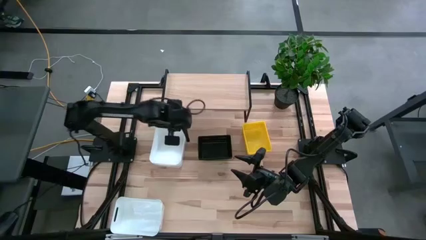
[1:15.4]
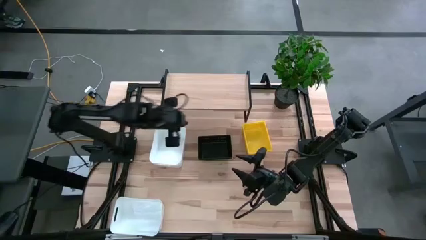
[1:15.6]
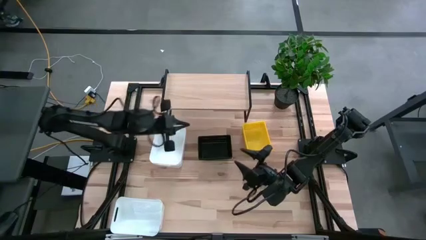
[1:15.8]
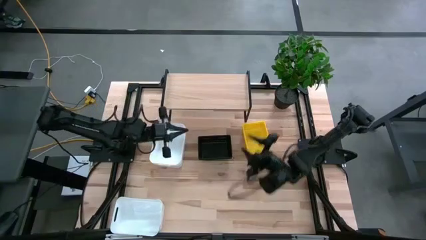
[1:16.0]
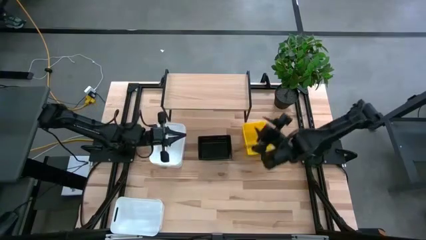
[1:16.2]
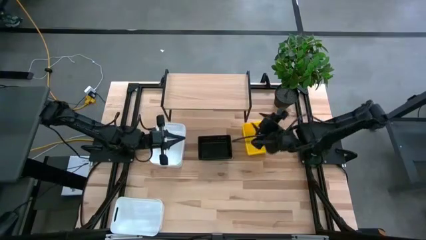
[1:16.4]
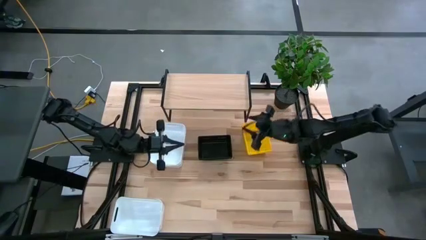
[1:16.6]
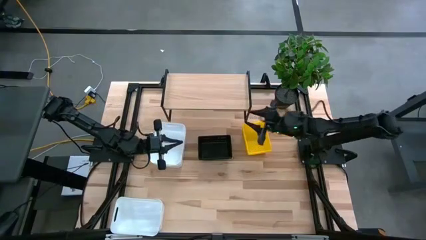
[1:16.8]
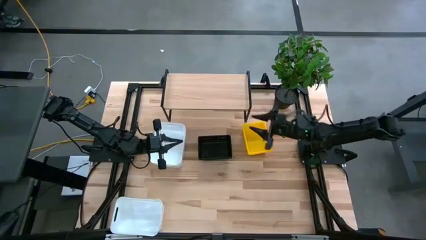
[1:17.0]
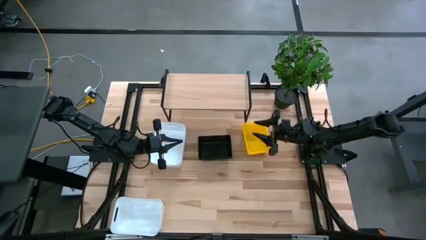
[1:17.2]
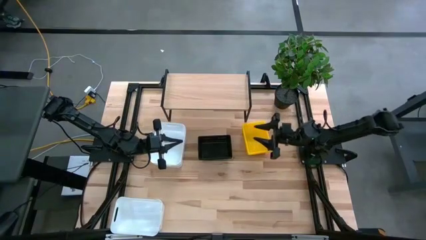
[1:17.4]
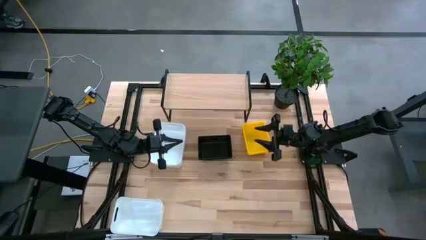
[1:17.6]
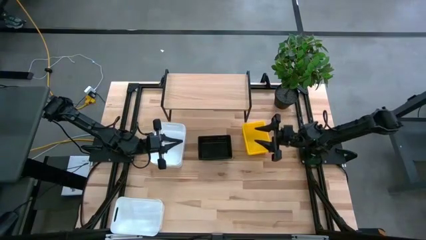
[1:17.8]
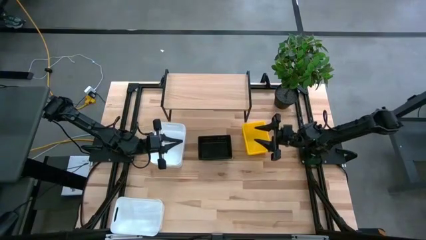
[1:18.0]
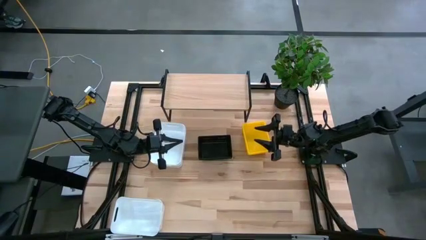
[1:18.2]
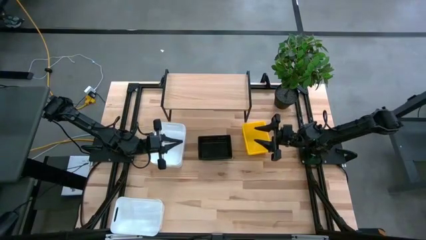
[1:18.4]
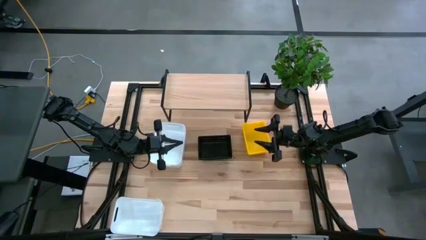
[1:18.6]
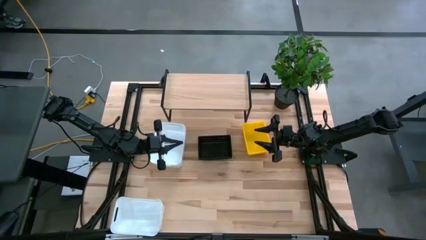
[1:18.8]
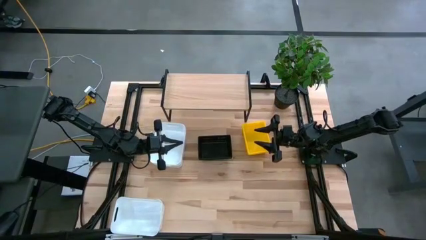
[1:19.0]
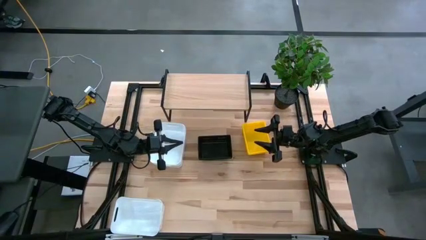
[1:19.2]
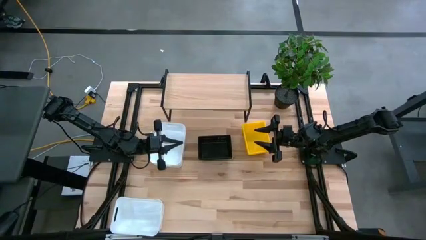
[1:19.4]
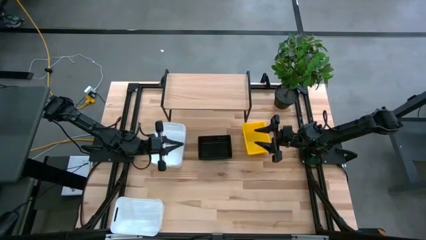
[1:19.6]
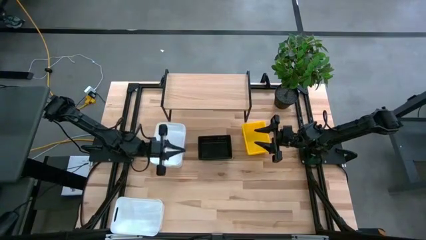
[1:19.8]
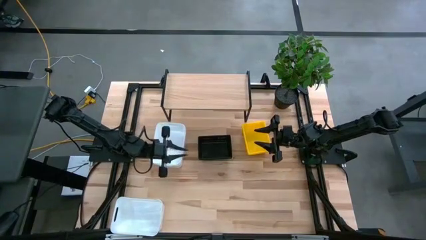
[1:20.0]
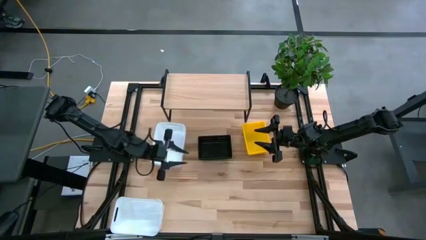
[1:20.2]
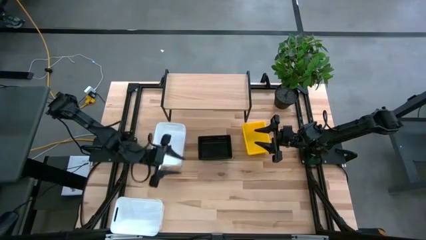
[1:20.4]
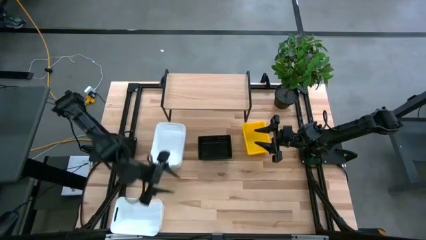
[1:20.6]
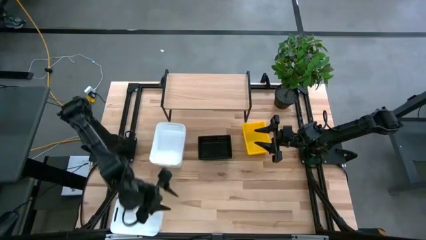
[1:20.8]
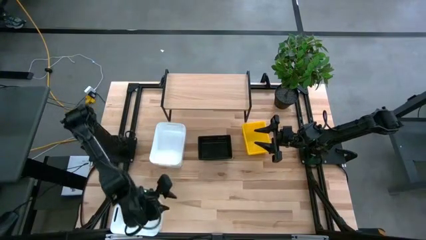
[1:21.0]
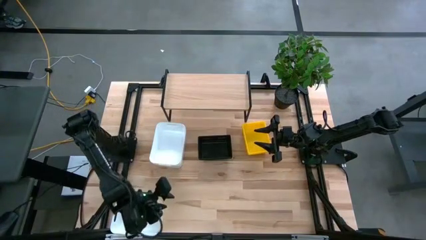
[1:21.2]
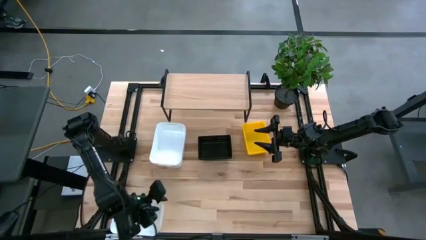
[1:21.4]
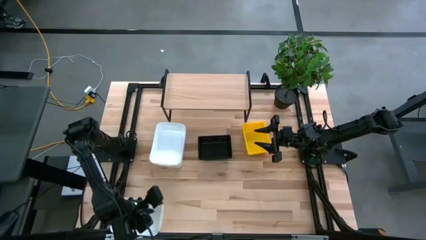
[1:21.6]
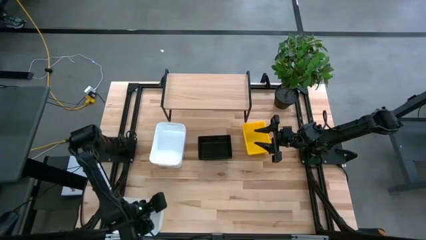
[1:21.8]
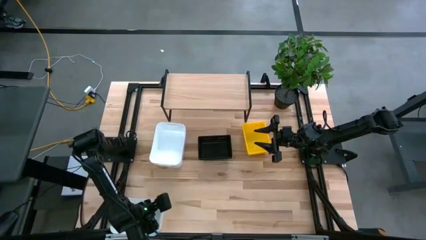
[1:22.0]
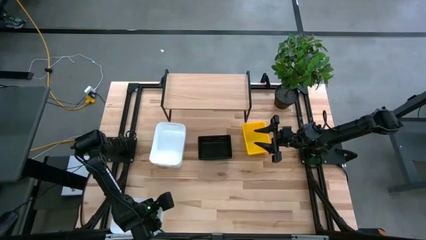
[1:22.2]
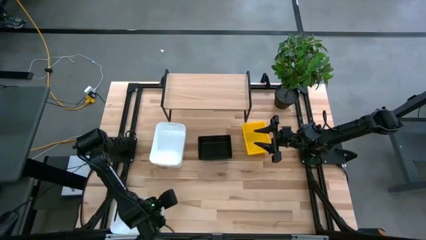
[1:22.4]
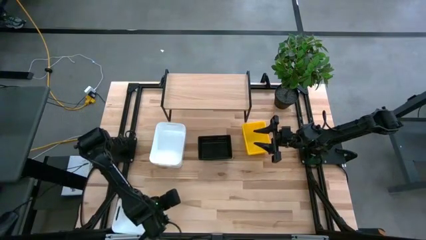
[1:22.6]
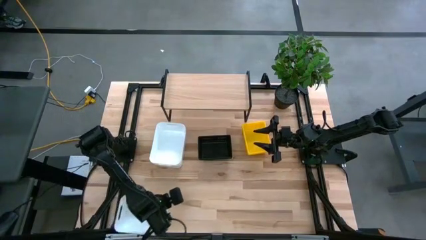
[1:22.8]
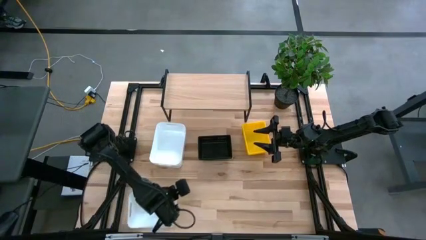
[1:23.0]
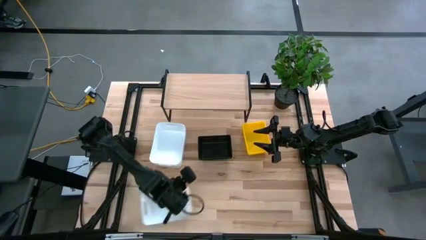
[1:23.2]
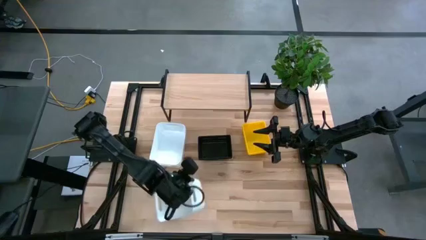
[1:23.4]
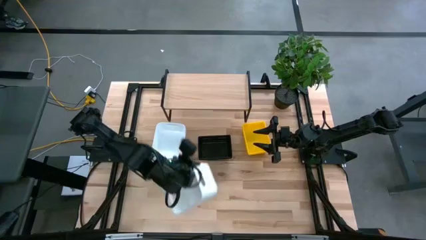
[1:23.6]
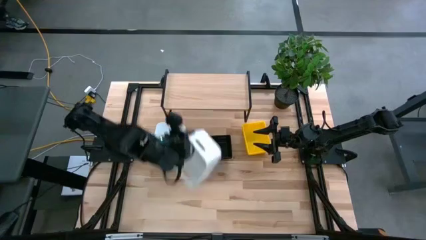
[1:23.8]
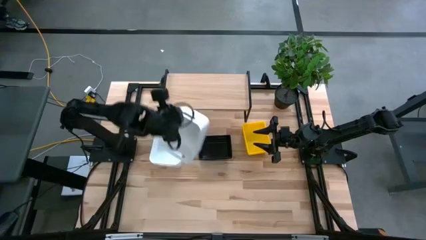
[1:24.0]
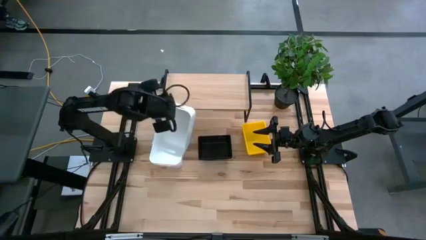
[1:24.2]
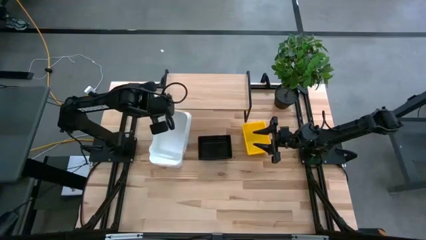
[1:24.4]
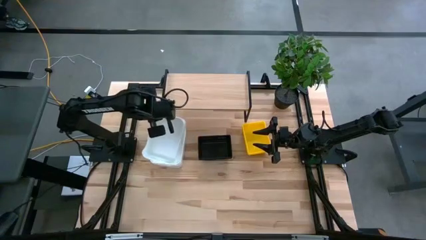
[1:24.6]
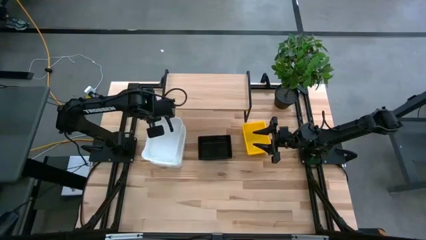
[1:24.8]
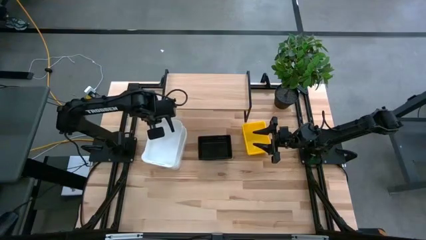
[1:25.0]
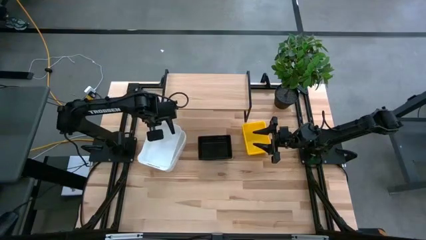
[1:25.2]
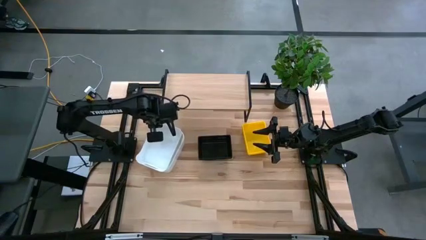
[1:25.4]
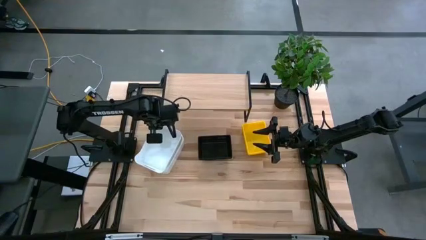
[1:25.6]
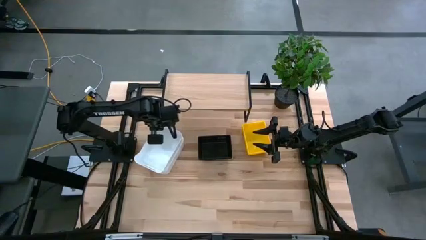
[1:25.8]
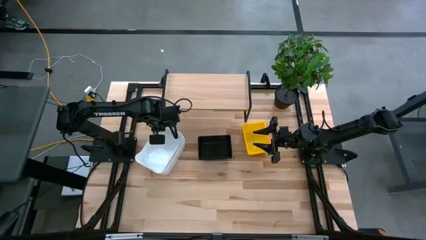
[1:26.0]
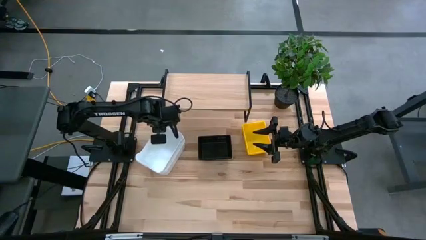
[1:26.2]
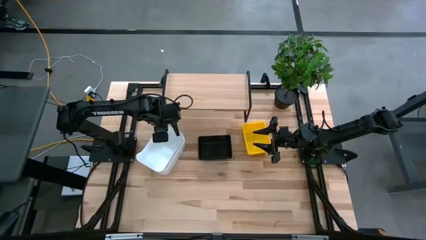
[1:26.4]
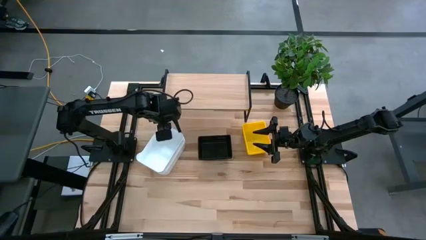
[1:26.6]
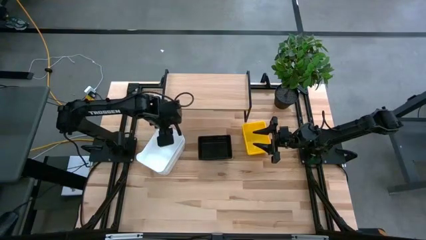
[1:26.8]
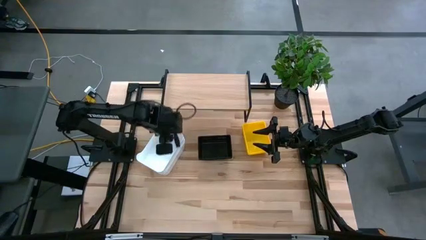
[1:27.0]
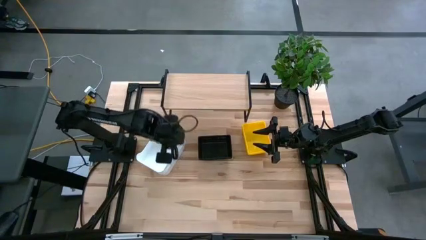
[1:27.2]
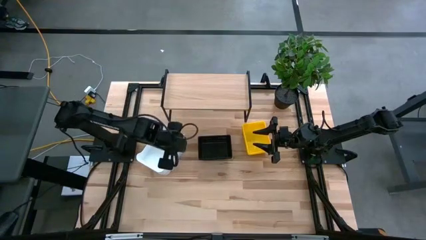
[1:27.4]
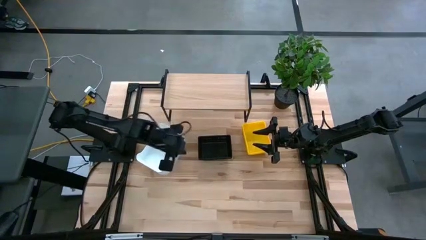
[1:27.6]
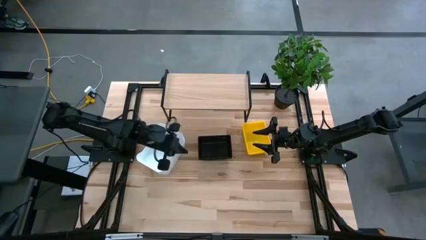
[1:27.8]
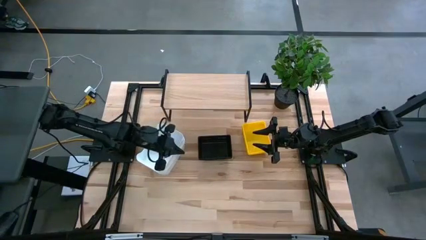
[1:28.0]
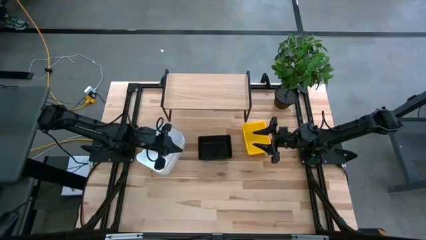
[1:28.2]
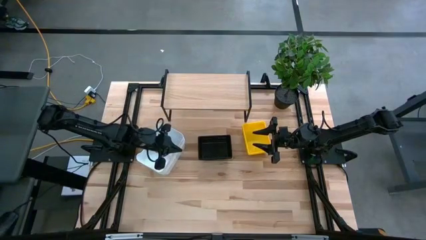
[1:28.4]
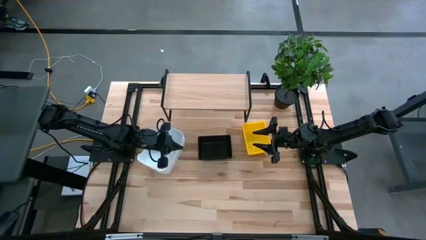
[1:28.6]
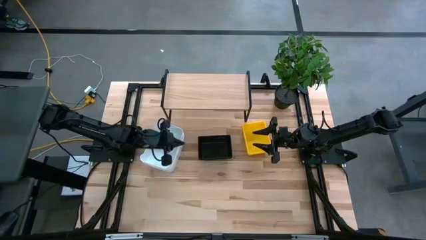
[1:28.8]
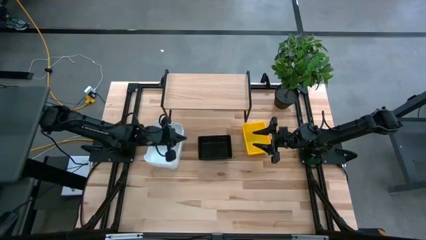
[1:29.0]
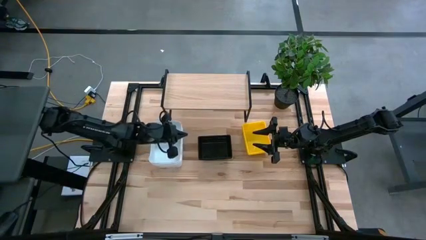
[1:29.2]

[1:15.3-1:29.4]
Task: Stack baskets on shelf by color
Stack the bottom white bin on the top white bins

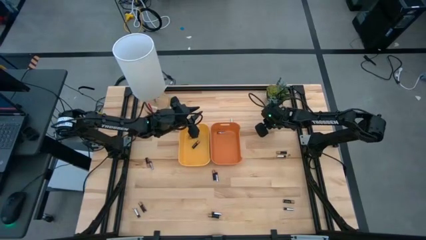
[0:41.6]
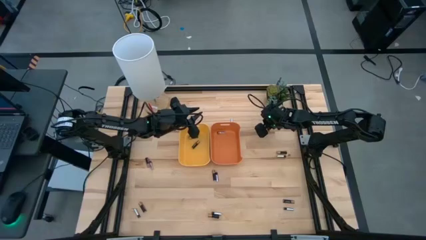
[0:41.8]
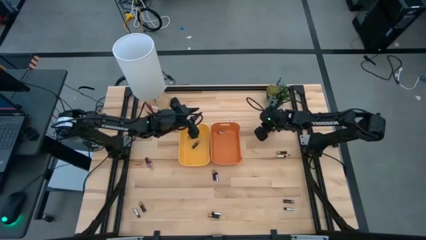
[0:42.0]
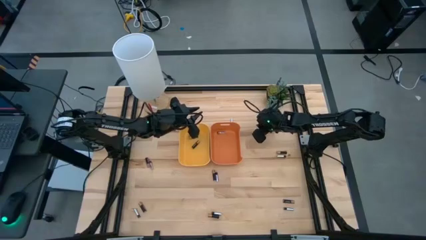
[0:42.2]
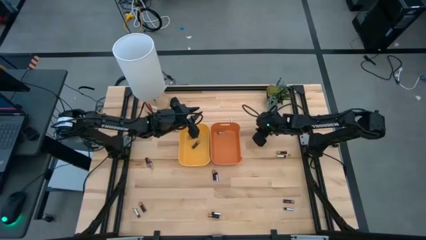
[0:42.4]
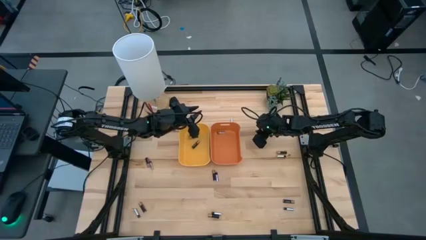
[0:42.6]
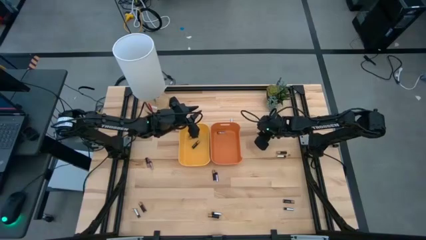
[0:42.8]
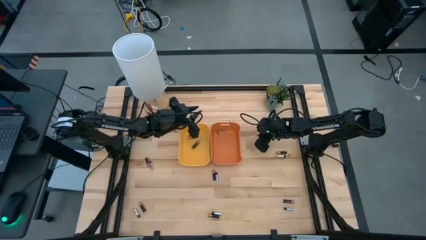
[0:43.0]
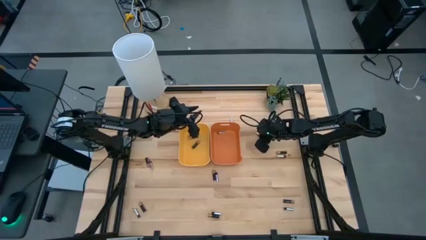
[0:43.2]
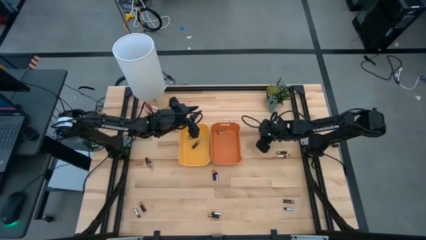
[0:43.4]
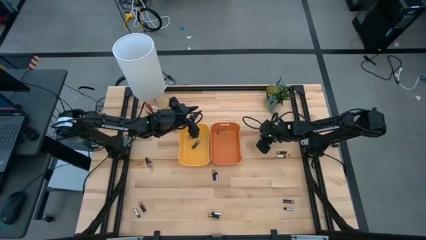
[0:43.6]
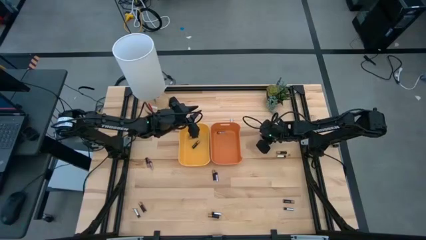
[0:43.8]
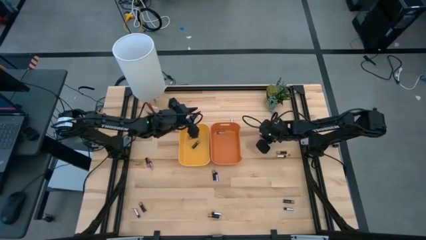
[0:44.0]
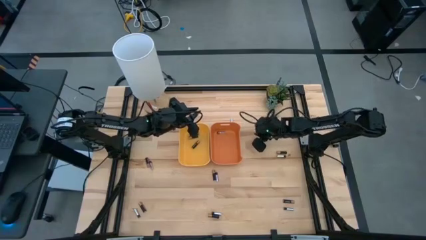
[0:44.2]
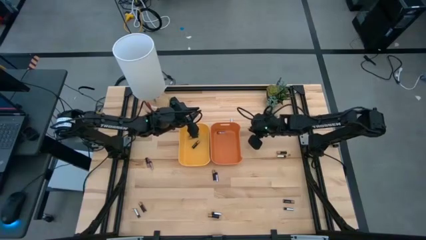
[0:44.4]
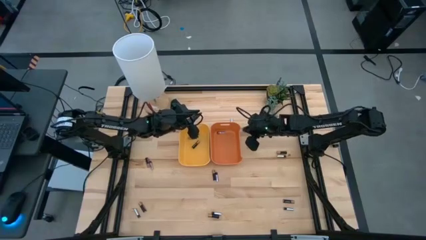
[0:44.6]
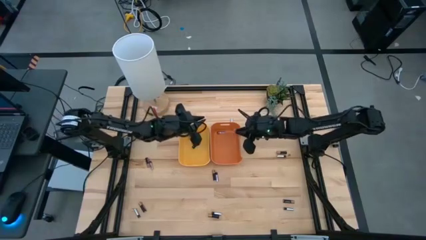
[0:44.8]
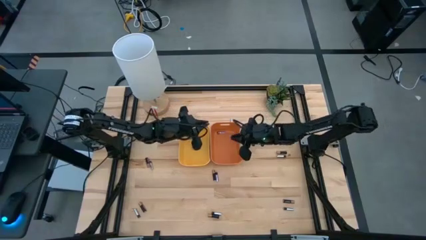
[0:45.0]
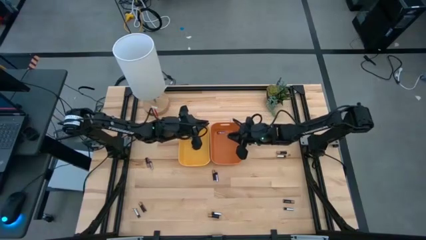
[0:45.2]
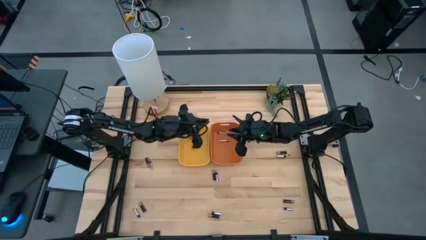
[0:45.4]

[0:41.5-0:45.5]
Task: Sort batteries
Put the top right silver battery into the orange bin
